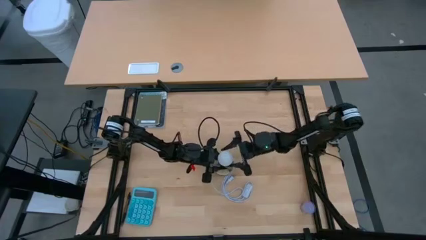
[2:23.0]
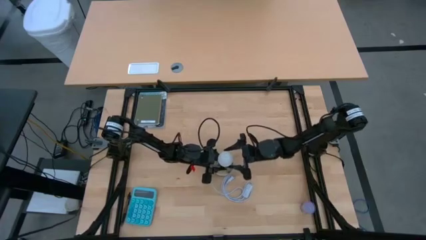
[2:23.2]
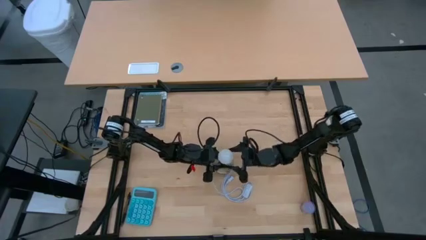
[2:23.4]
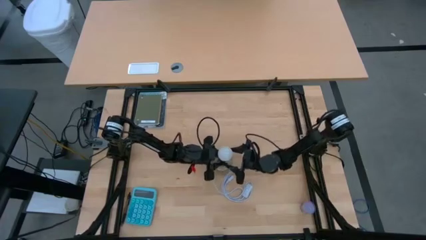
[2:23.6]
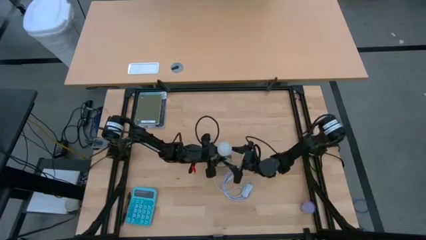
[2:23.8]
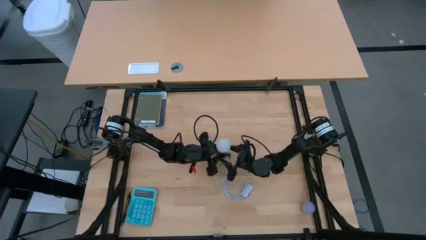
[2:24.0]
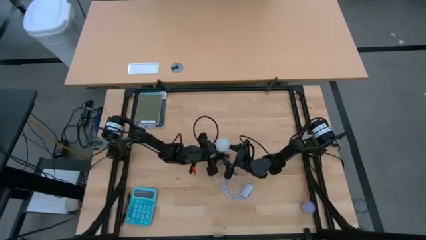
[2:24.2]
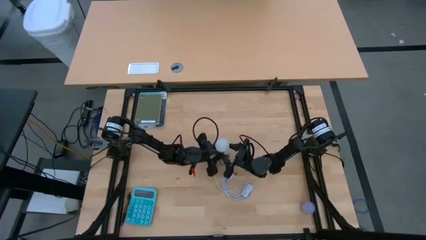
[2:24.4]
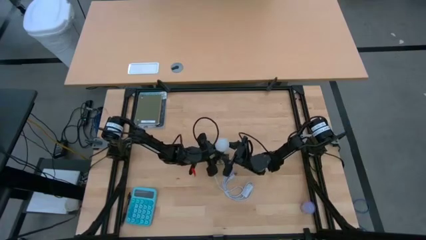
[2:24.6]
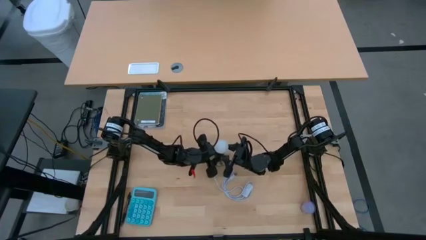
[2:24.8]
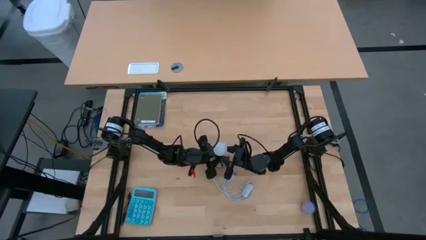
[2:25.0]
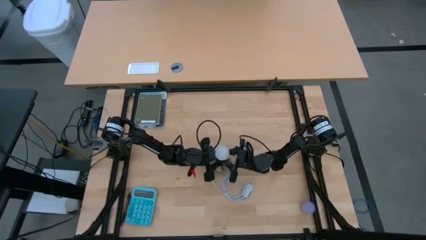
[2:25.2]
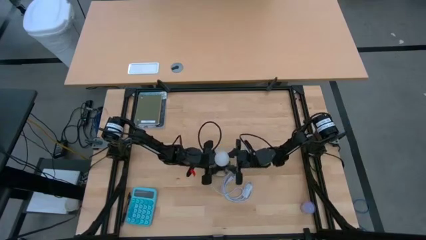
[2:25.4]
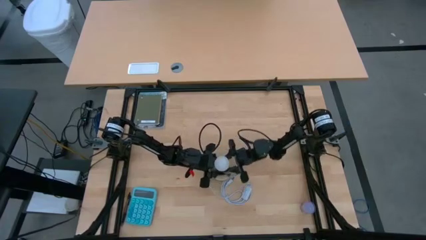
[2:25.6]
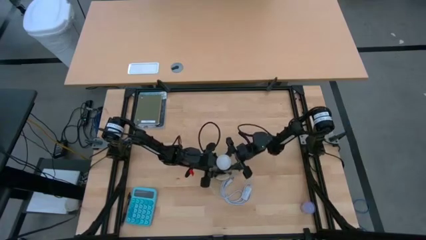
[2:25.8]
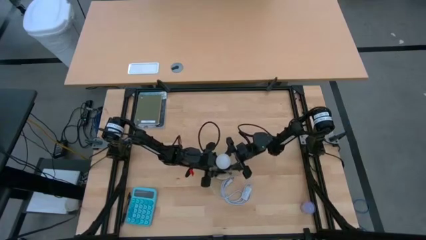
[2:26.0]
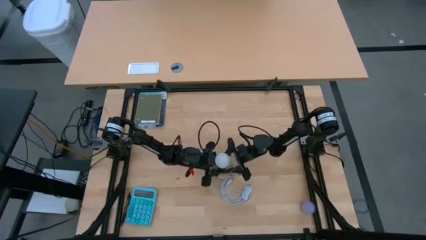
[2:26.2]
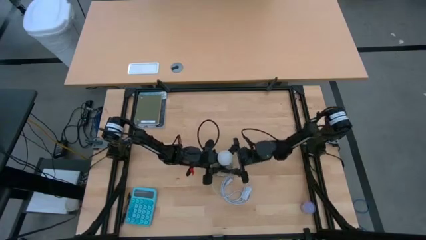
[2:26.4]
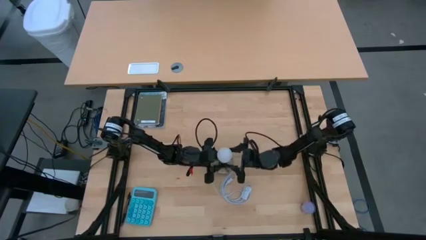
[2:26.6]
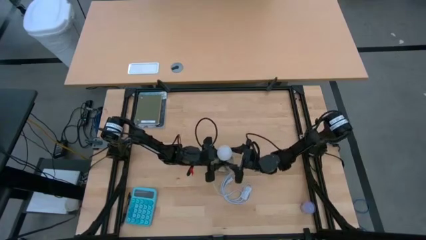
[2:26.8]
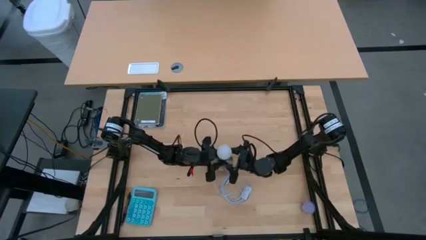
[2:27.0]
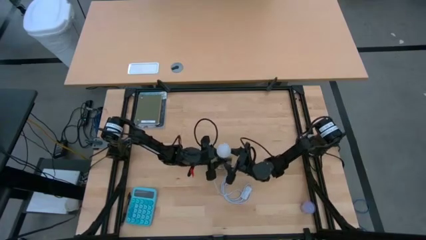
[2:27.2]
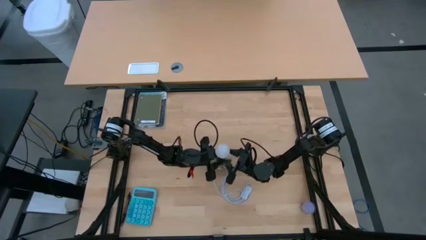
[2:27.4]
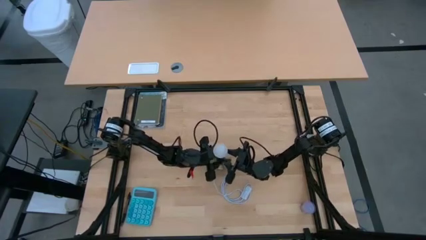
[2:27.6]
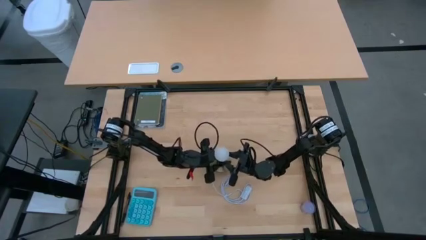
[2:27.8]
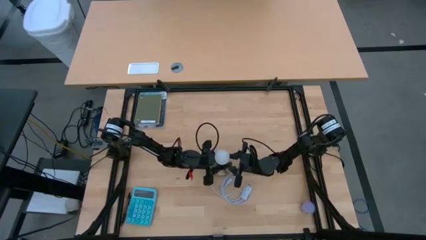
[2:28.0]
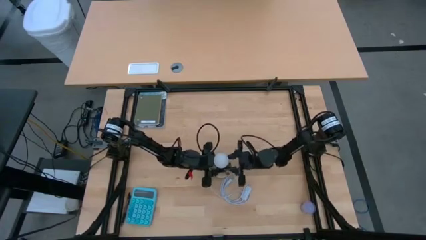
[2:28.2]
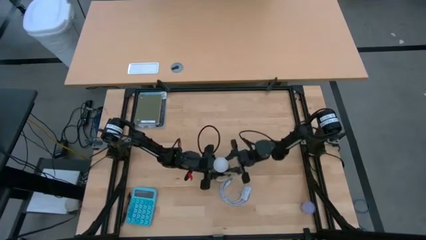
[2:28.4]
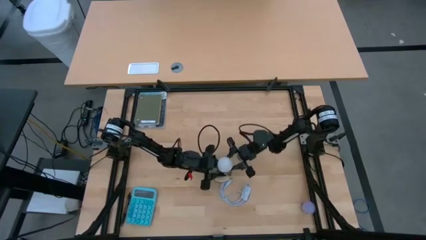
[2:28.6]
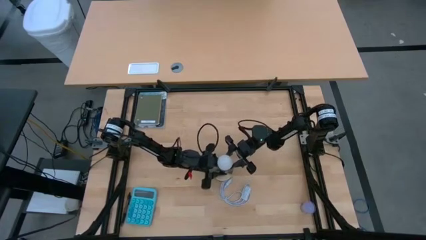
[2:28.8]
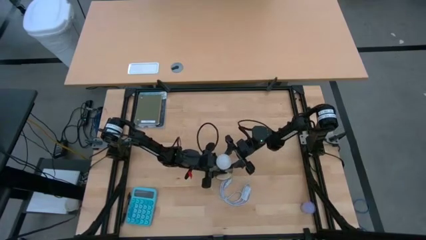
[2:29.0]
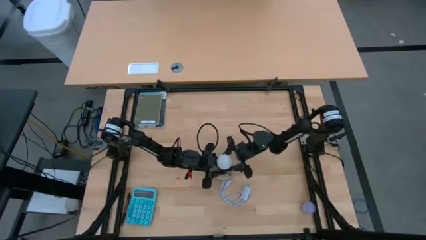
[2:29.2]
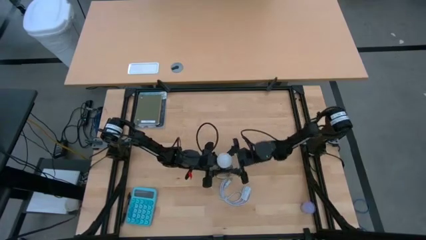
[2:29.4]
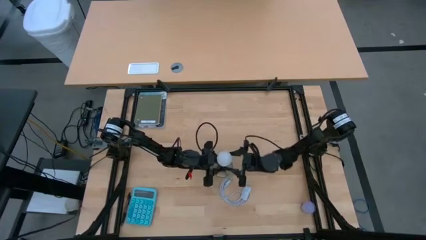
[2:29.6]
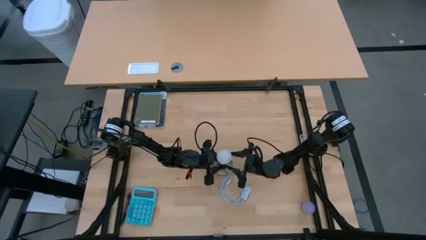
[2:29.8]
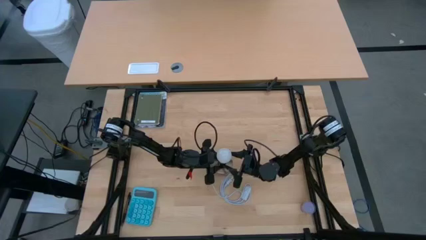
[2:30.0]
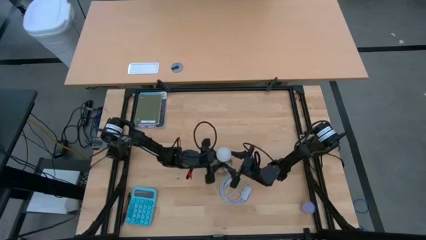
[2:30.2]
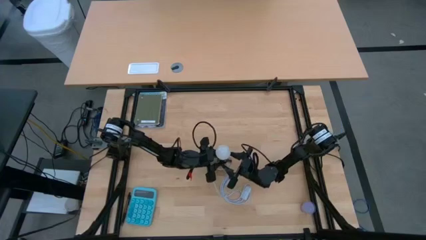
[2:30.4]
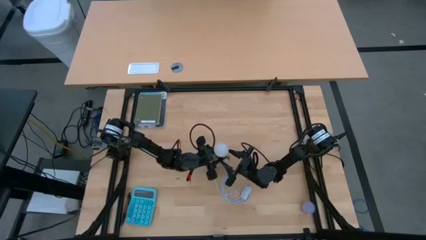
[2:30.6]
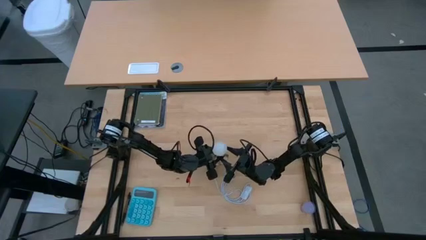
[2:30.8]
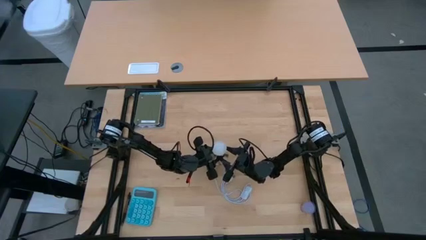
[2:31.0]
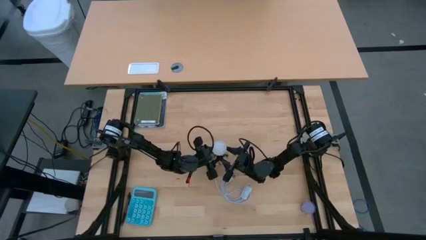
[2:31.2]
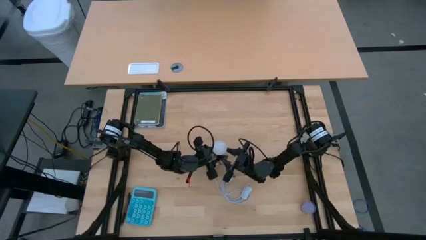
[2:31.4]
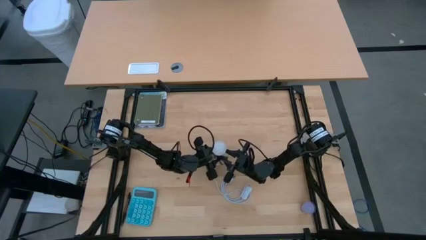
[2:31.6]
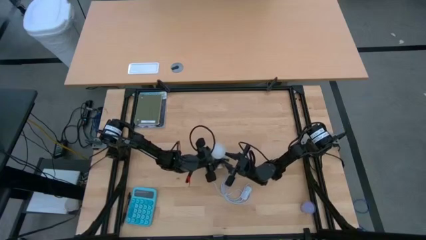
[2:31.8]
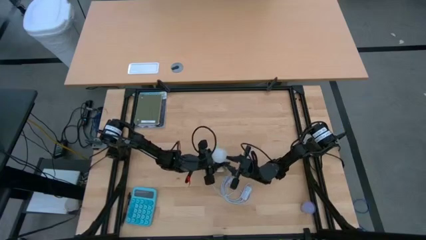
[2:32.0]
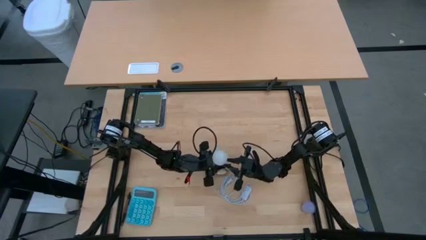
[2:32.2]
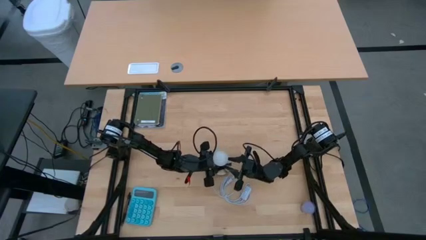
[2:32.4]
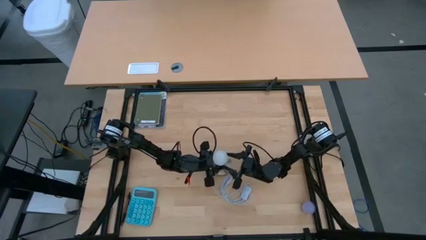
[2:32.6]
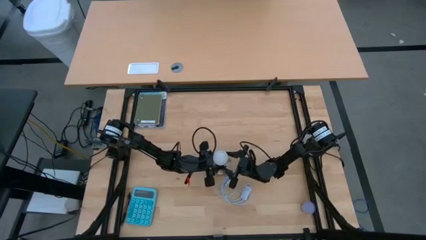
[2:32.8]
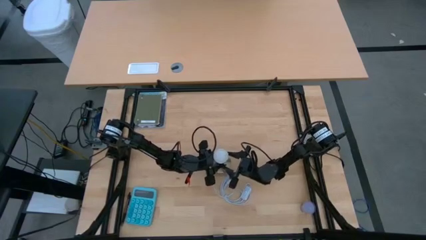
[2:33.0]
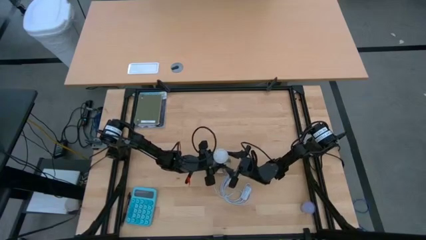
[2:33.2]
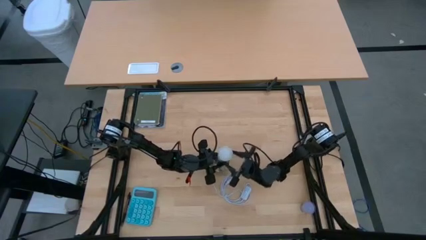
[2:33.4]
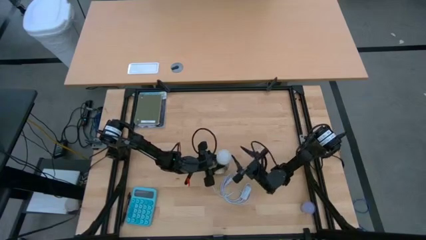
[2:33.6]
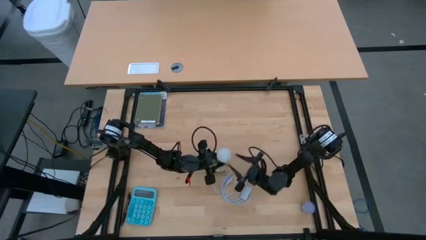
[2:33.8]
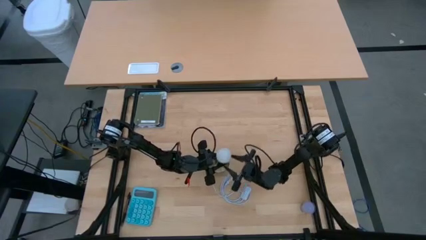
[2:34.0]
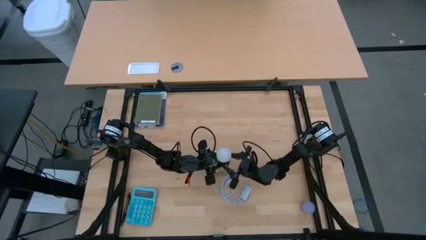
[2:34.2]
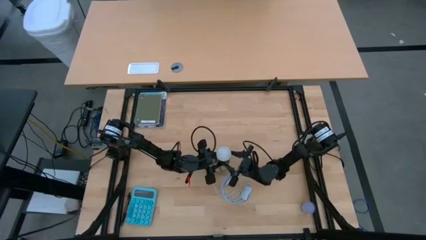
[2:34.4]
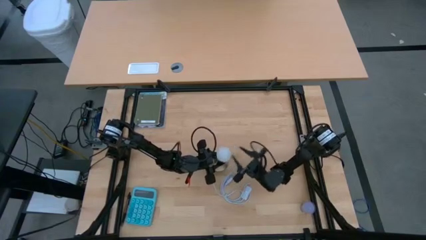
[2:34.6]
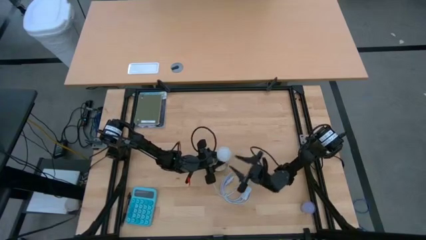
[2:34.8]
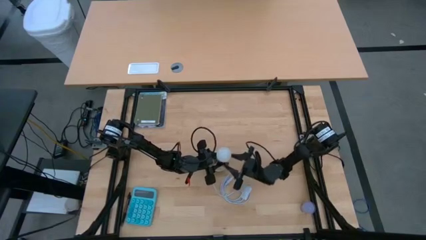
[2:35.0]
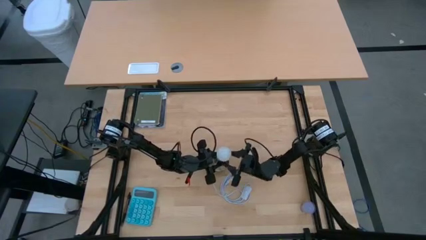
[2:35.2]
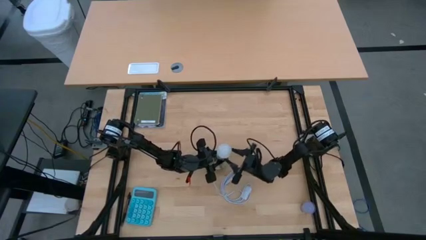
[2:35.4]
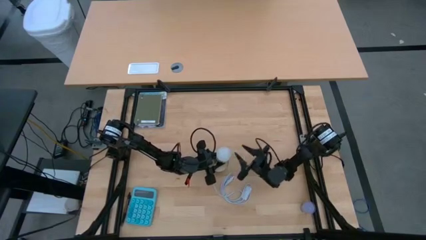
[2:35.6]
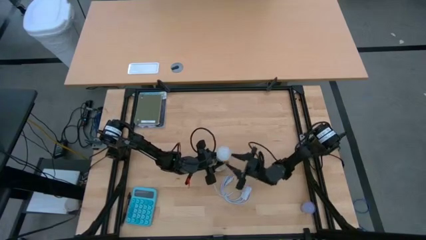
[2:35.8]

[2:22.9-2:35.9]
Task: Screw lightbulb
Remove the lightbulb from the desk lamp

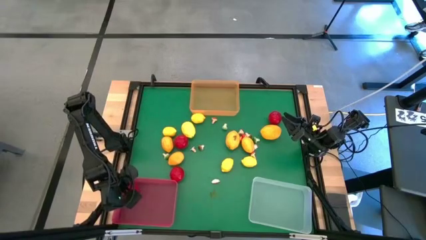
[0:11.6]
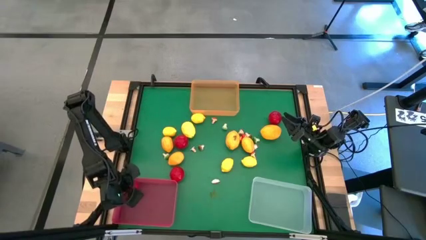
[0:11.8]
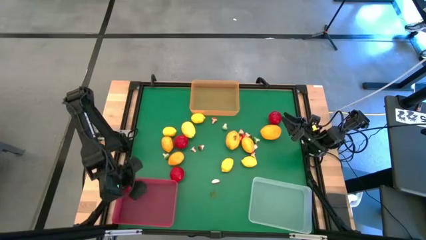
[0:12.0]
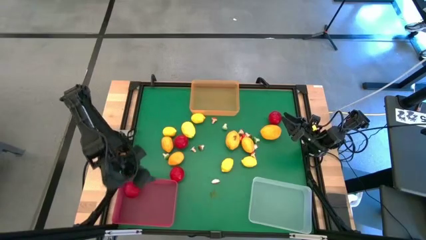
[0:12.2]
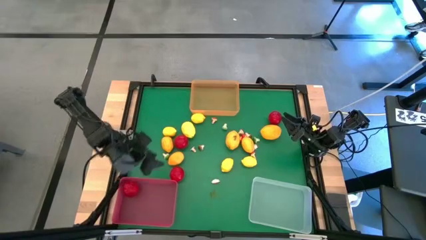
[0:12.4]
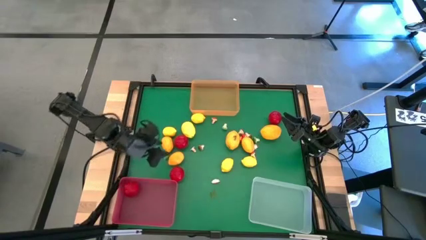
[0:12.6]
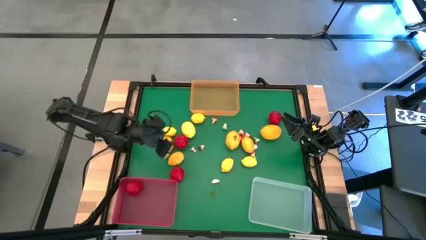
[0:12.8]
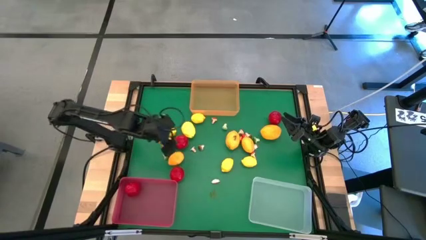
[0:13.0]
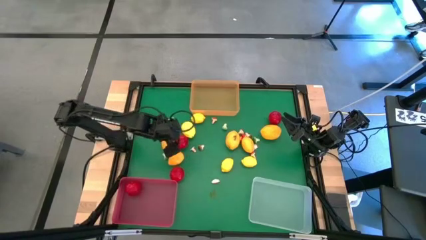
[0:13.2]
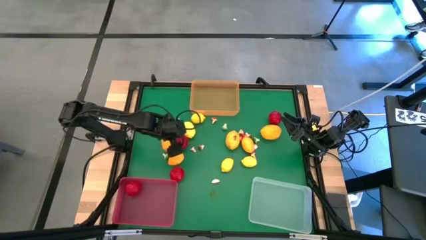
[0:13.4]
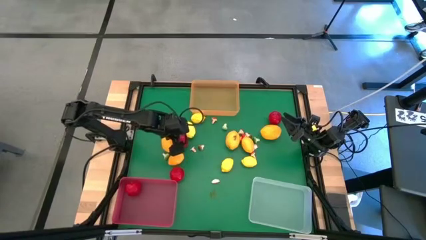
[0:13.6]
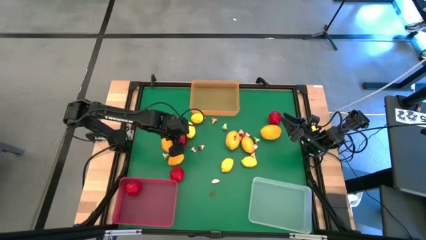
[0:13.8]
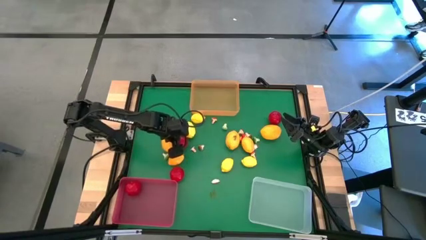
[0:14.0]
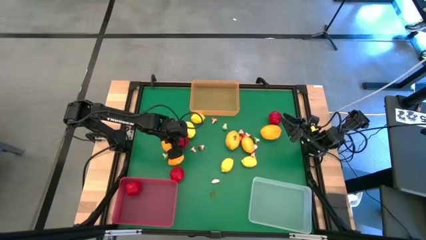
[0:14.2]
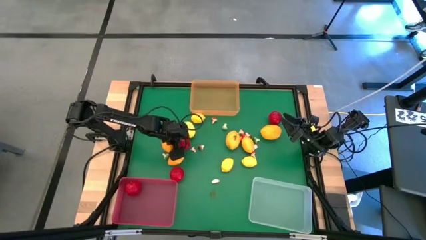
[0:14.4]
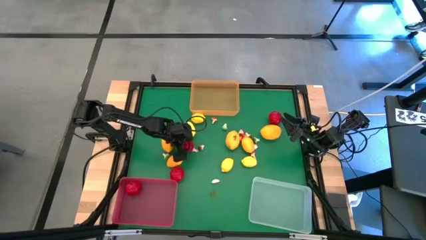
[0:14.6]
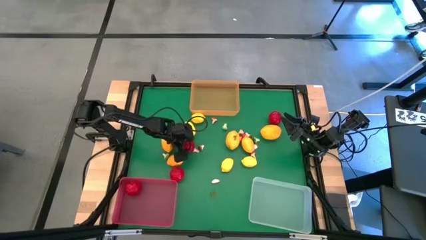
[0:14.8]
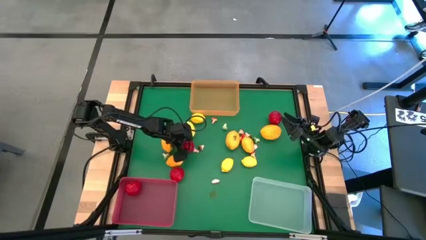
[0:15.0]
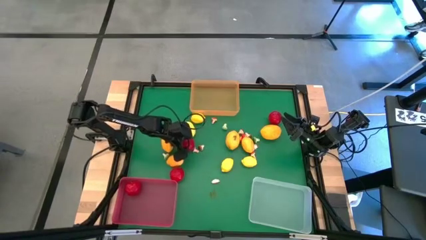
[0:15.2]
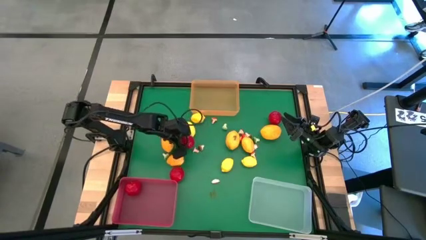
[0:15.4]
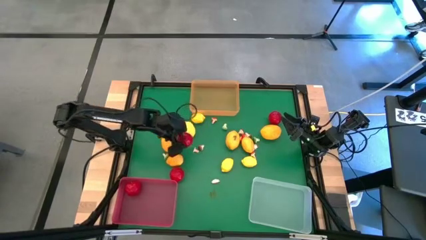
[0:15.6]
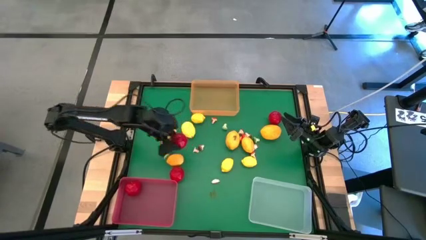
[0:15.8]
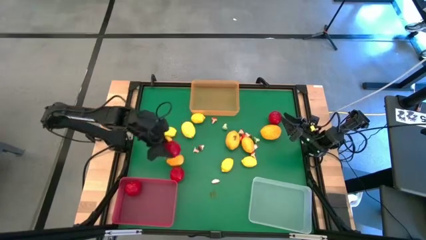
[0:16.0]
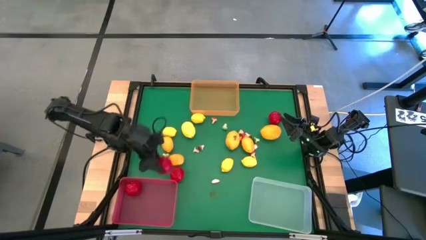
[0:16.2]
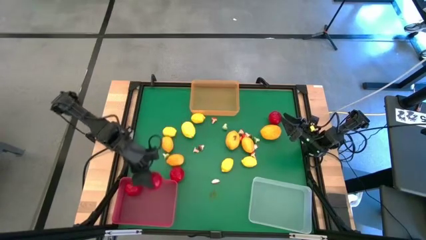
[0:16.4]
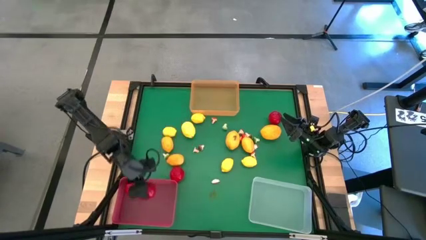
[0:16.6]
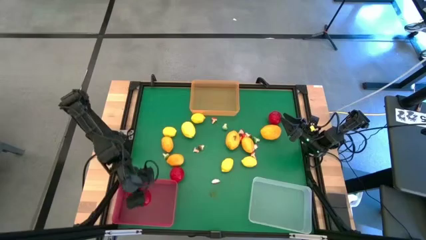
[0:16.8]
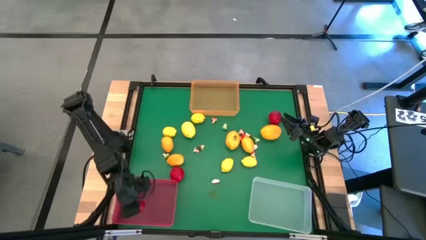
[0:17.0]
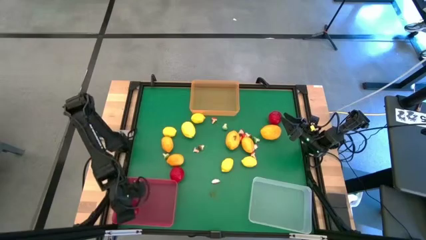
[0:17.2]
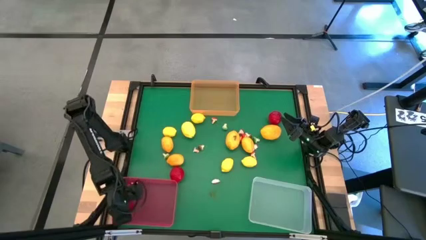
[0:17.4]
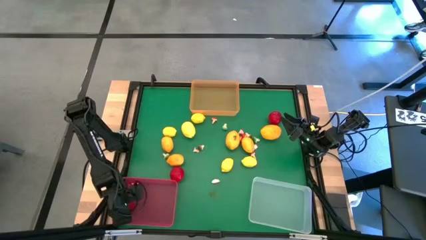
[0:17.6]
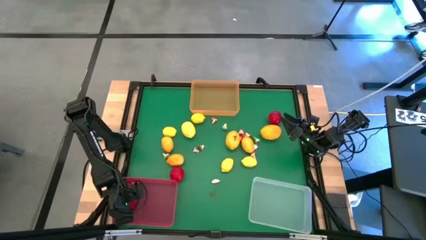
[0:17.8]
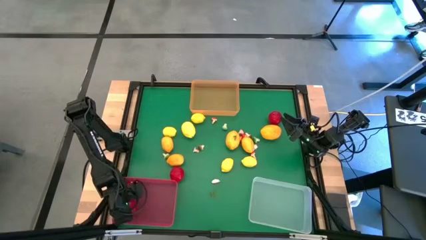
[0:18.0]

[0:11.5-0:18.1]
Task: Sort produce into baskets
Put the tomato into the red bin
